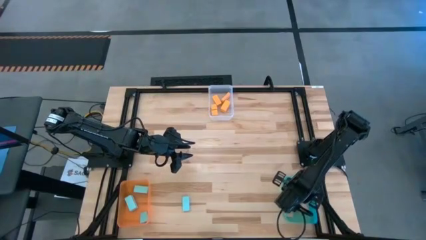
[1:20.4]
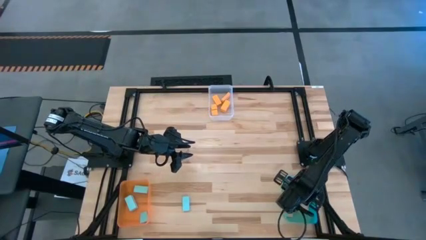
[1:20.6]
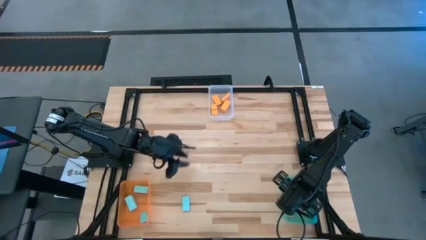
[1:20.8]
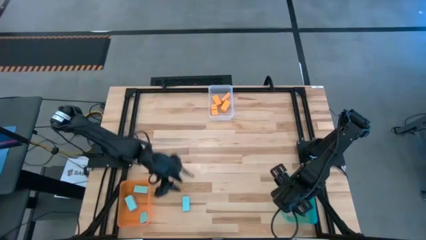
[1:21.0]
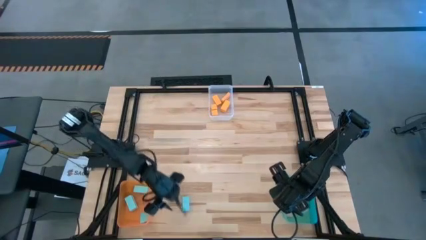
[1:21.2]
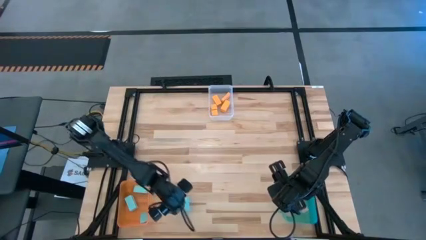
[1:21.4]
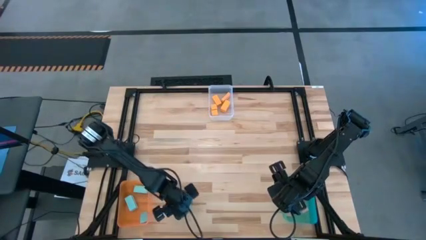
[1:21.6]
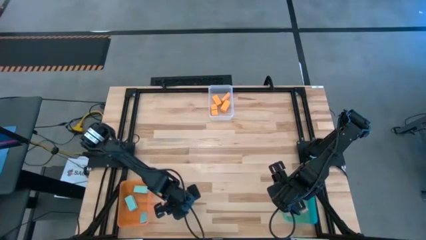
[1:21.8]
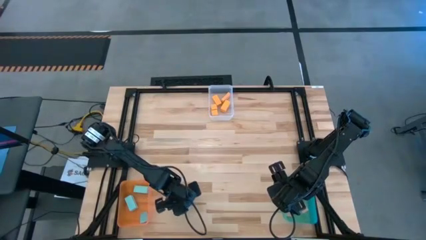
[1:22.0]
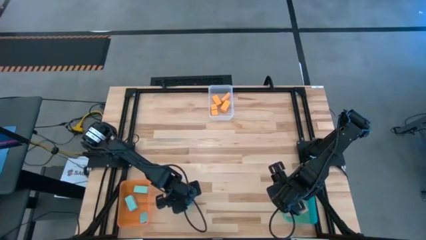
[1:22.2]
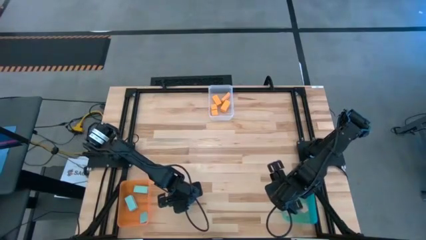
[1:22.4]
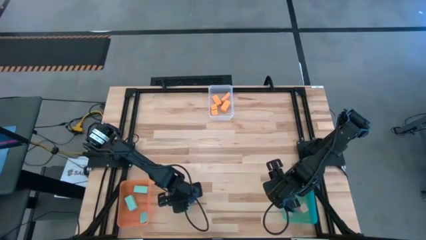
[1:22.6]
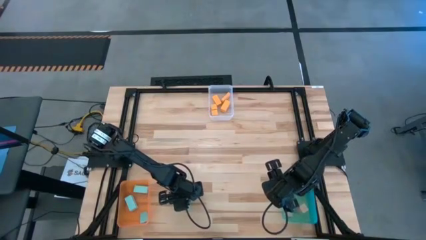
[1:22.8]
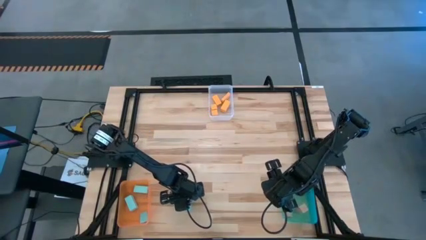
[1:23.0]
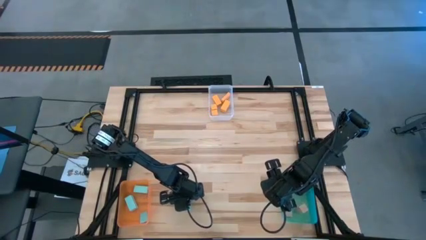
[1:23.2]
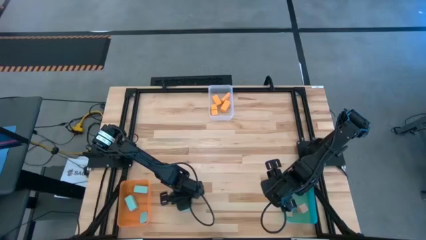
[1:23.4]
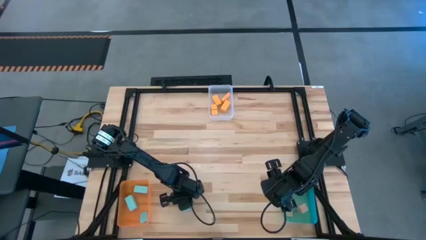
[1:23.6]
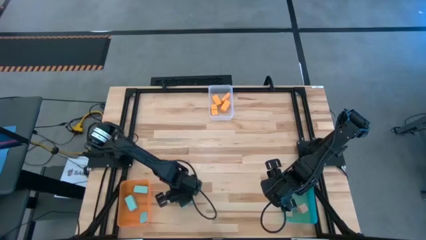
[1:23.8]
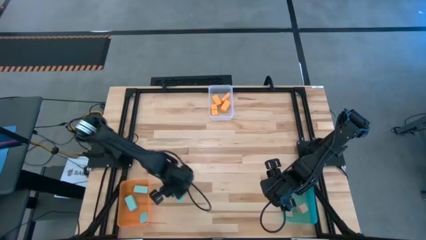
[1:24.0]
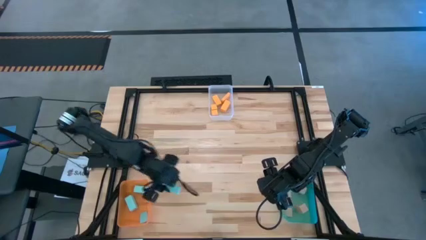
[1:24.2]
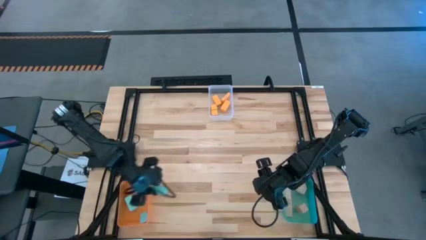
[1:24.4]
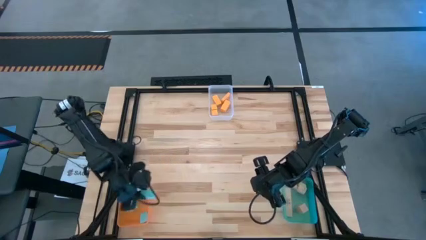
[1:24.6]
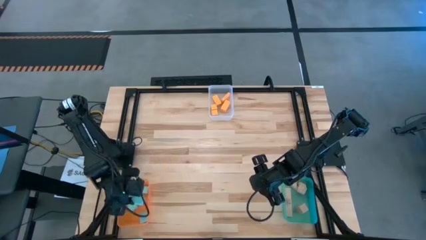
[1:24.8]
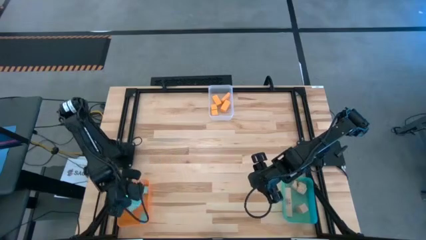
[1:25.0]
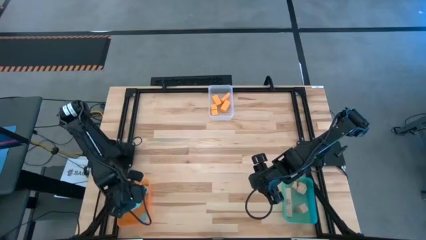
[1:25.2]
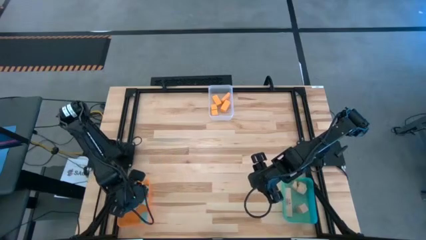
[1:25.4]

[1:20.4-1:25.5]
Task: Sort & place blocks by color
Put the sky blue block into the transparent orange bin

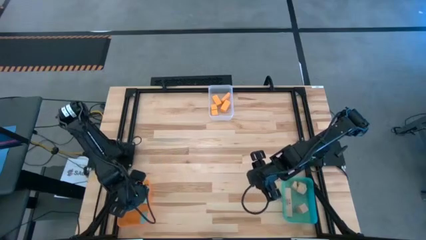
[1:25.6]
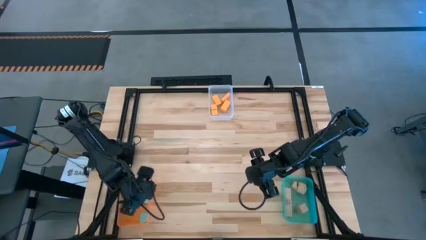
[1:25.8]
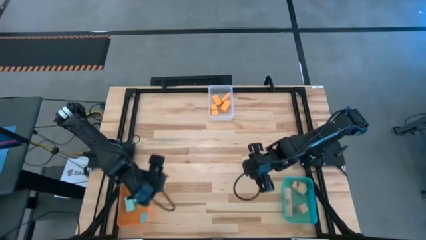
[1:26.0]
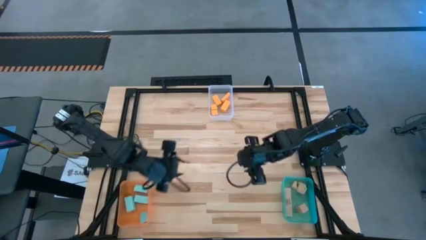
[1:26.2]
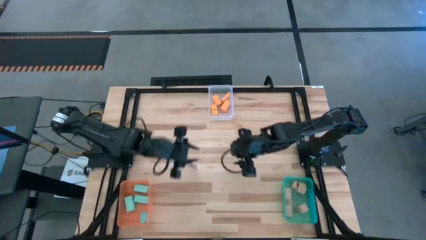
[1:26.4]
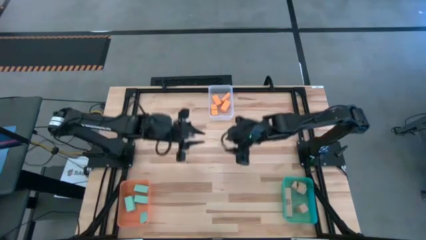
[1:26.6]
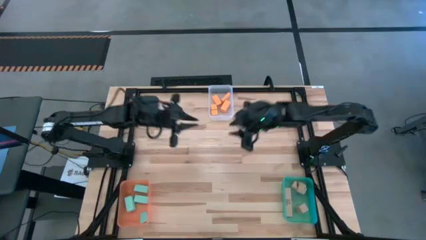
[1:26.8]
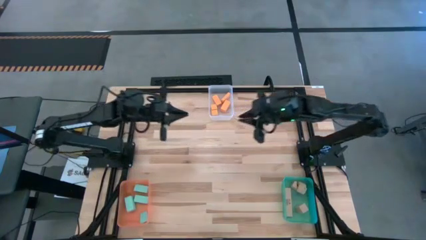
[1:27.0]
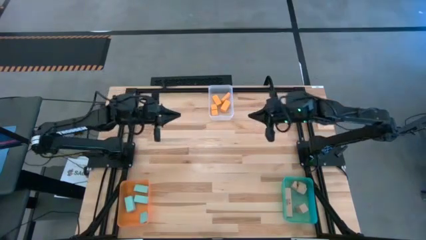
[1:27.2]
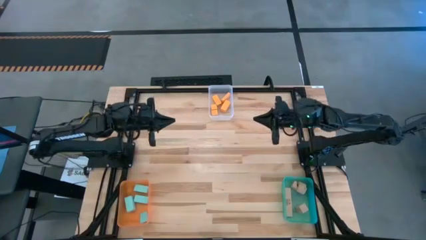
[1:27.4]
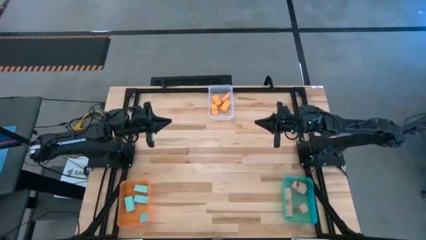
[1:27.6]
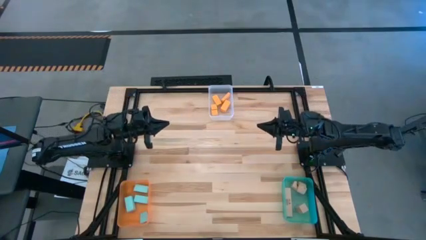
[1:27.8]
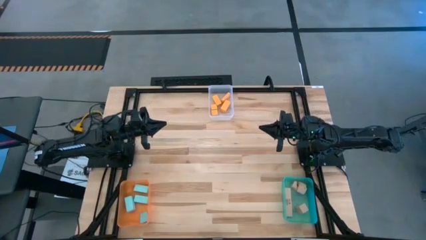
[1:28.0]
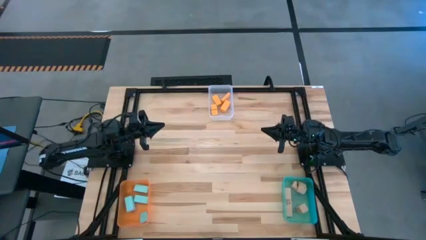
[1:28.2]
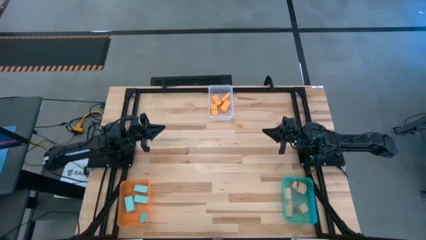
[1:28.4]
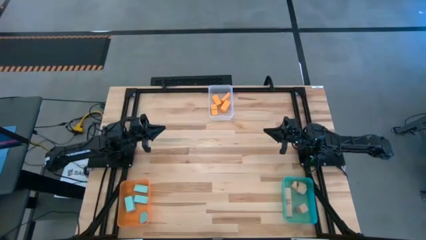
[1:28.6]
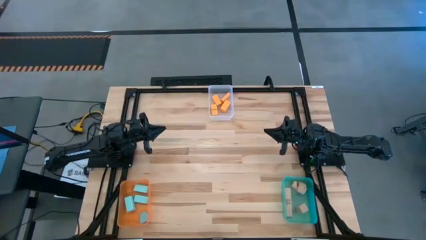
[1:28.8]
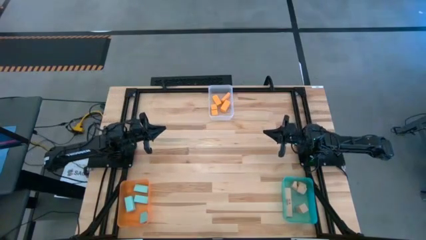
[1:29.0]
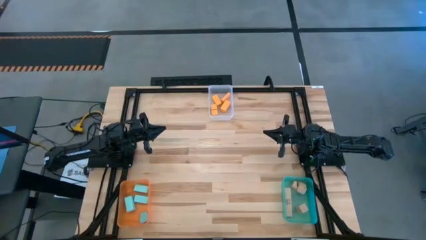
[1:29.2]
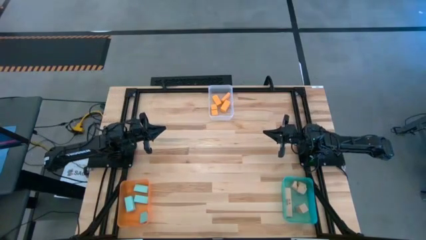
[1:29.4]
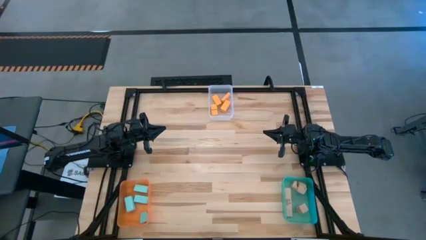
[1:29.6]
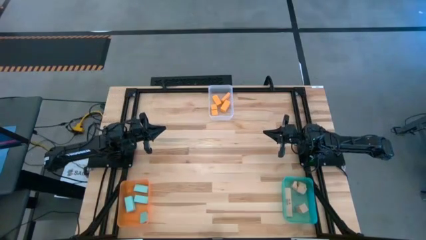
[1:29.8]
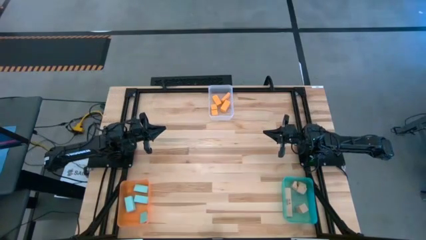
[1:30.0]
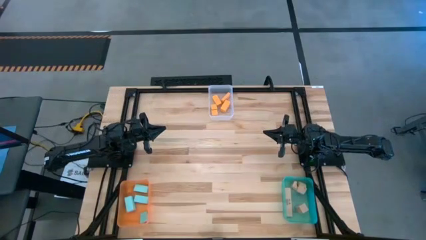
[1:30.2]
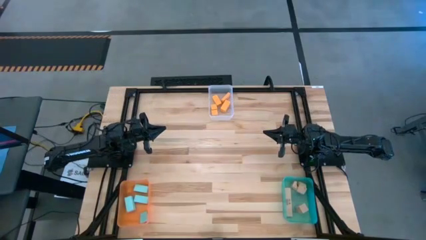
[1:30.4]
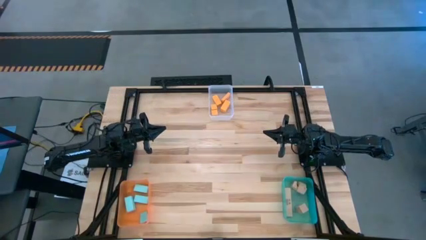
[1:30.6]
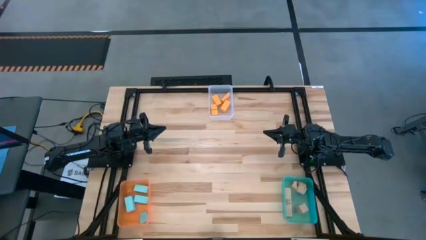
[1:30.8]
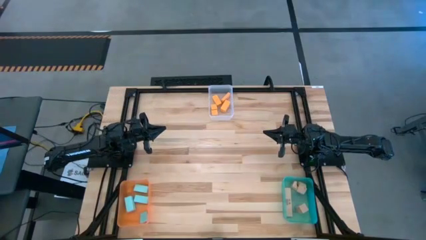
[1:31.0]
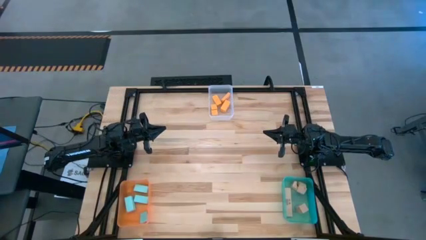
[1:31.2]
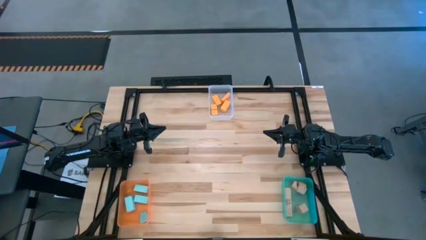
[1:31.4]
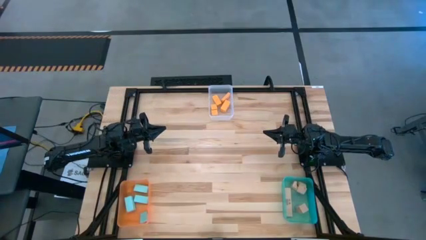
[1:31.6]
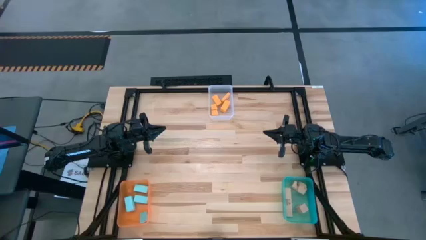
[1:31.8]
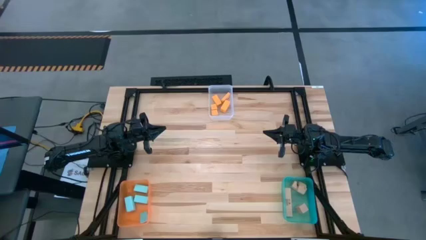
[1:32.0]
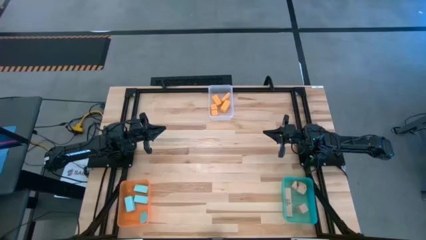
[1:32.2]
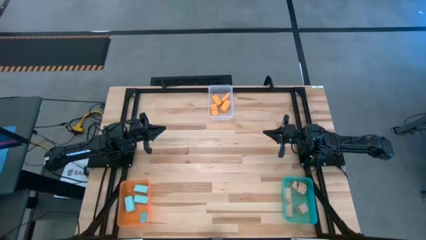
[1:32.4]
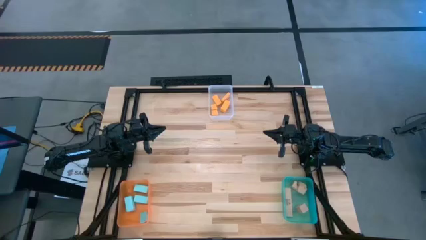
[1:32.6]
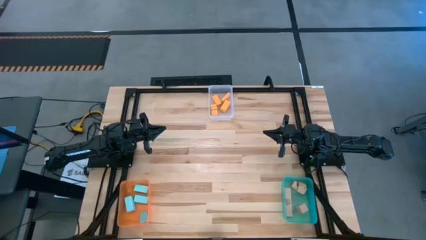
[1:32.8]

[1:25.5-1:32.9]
Return to Home Position

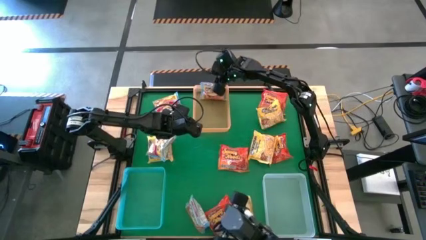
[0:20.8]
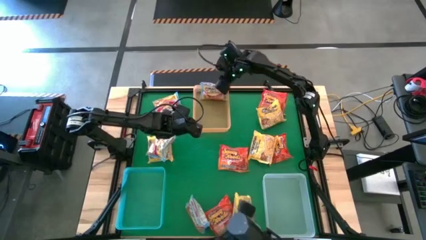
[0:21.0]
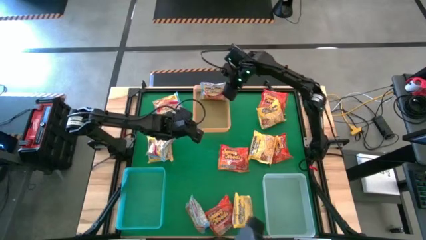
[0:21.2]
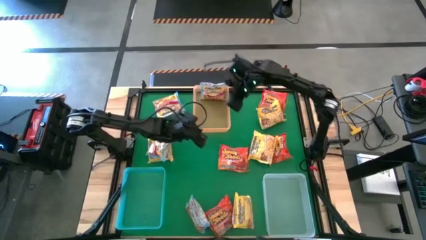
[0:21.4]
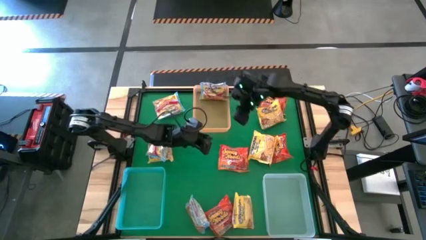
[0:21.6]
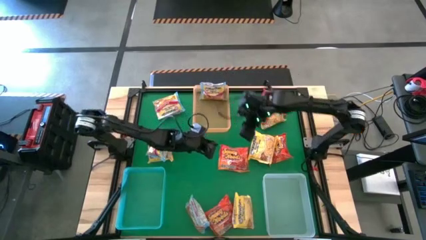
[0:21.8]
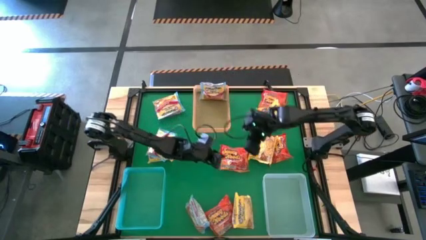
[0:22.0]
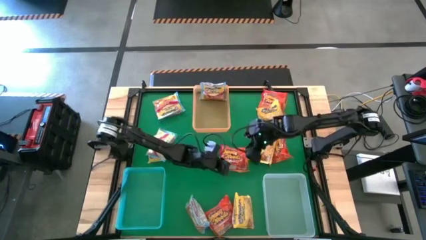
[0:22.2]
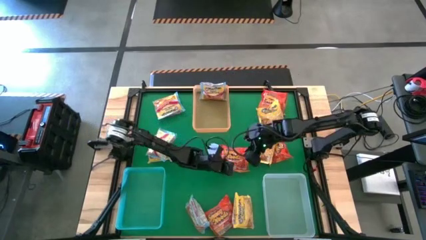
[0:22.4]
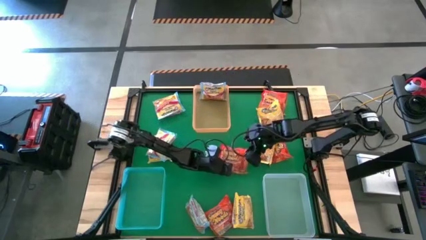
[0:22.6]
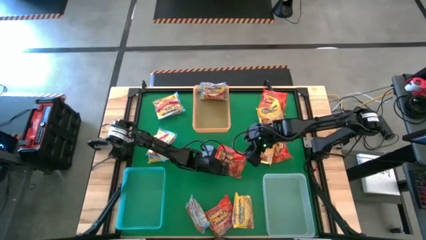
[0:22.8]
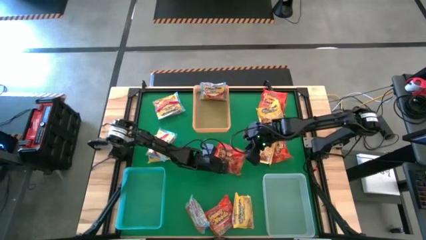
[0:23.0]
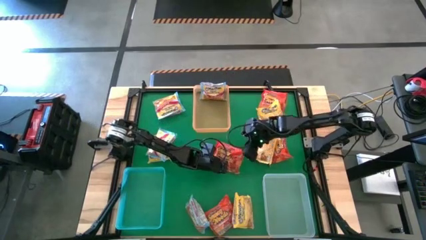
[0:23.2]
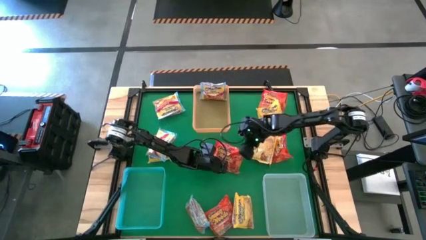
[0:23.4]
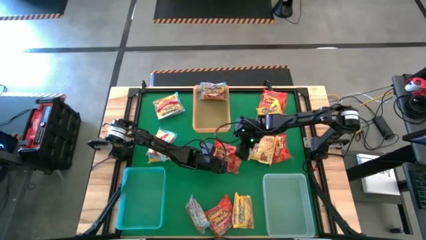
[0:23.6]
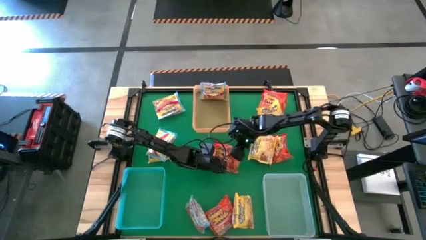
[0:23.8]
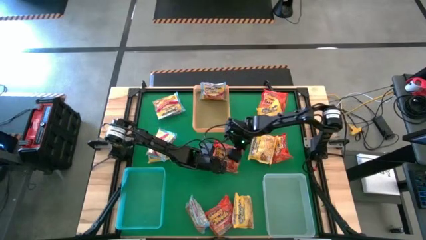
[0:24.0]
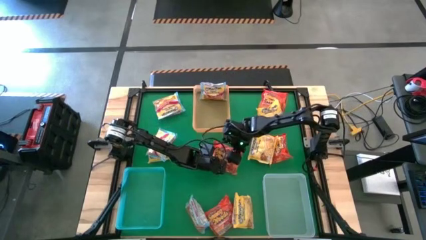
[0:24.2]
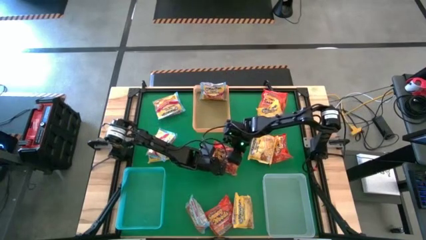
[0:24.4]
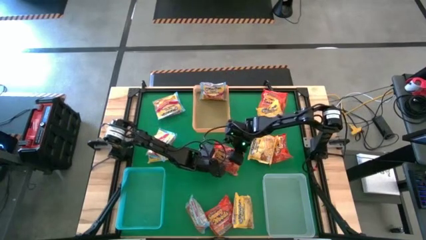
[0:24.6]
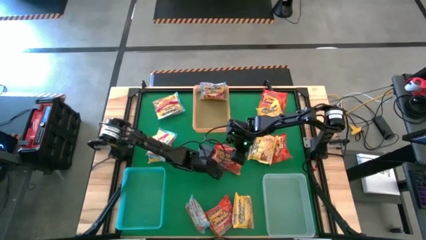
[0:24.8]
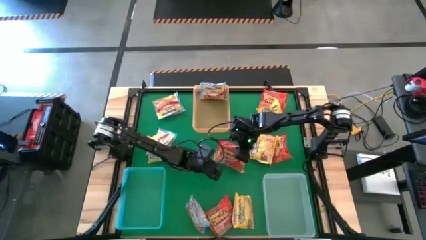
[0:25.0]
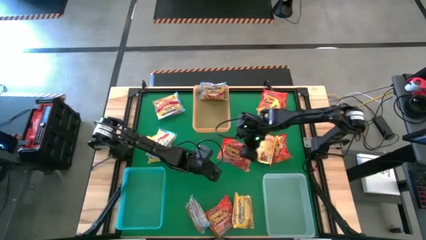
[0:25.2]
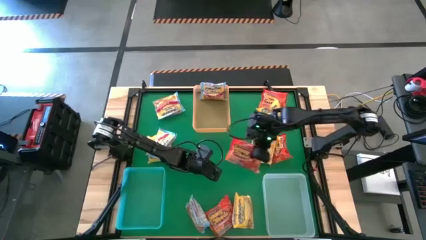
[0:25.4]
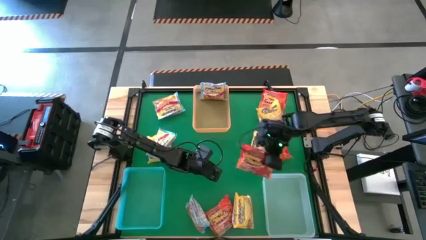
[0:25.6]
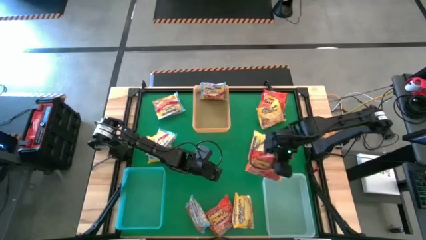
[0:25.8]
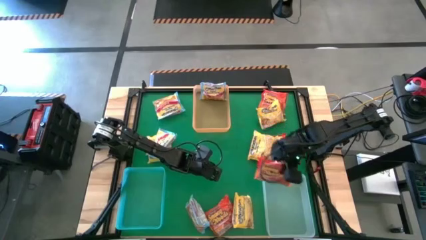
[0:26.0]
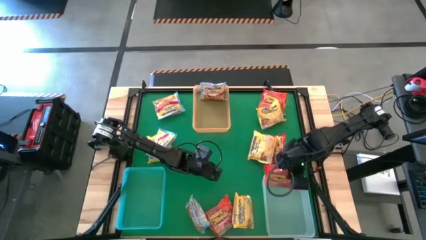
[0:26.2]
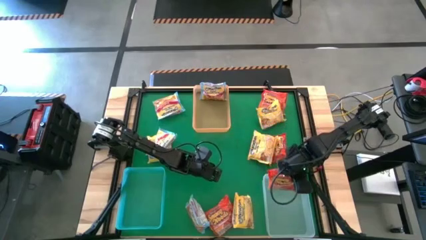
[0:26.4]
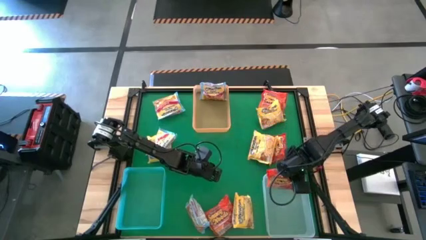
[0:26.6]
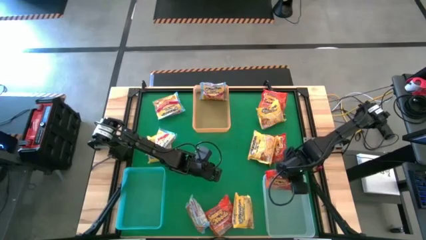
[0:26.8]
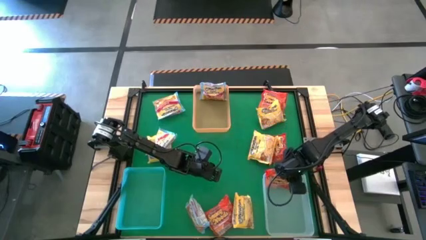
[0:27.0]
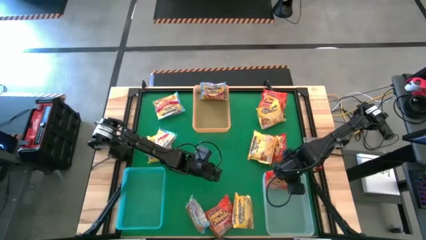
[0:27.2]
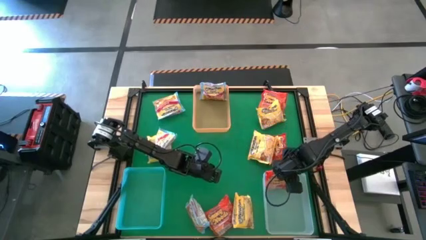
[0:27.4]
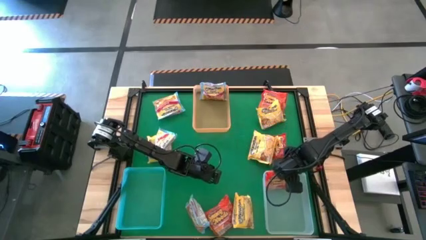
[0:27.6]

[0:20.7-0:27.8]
Task: Sort Maruchan noodles
Put the orange noodle pack into the transparent bin
